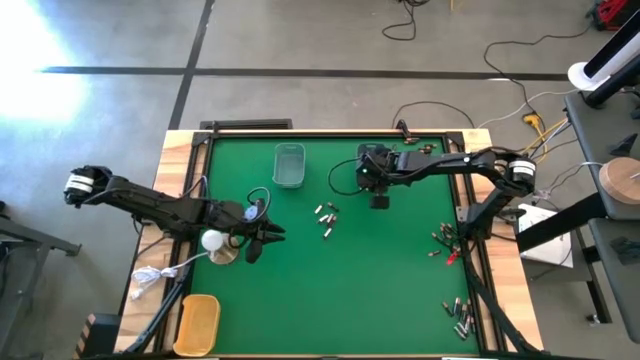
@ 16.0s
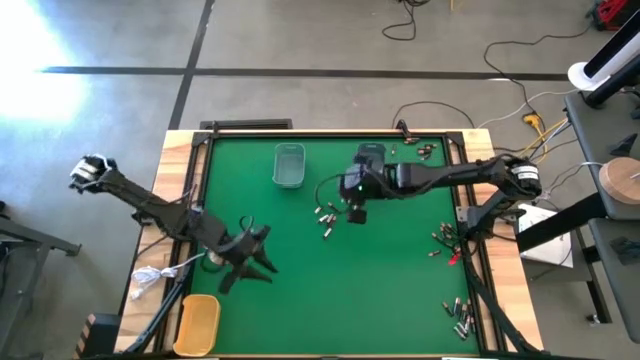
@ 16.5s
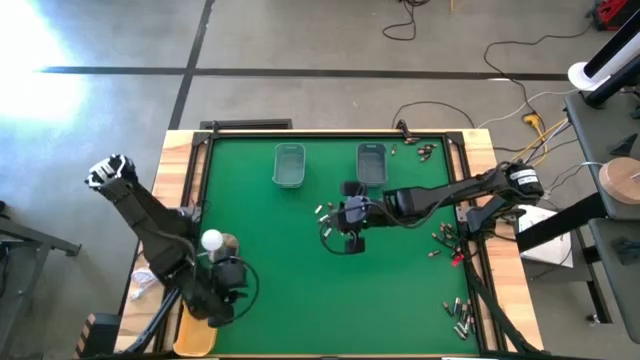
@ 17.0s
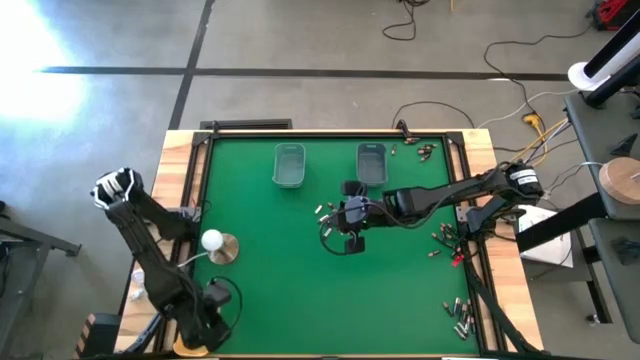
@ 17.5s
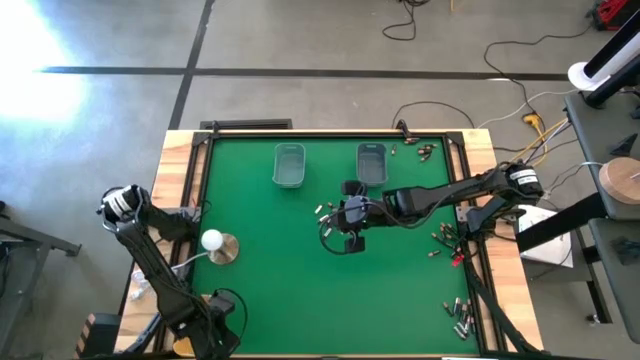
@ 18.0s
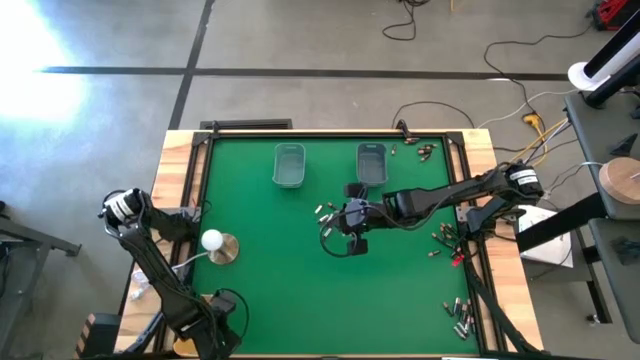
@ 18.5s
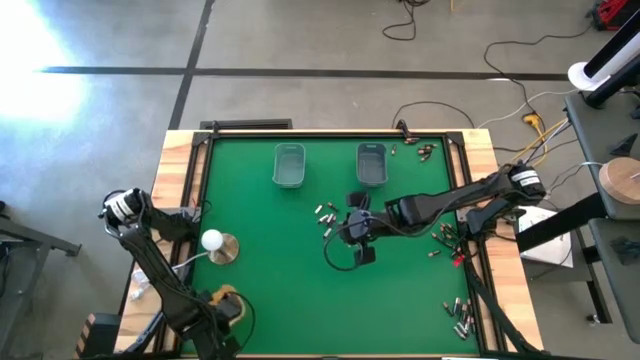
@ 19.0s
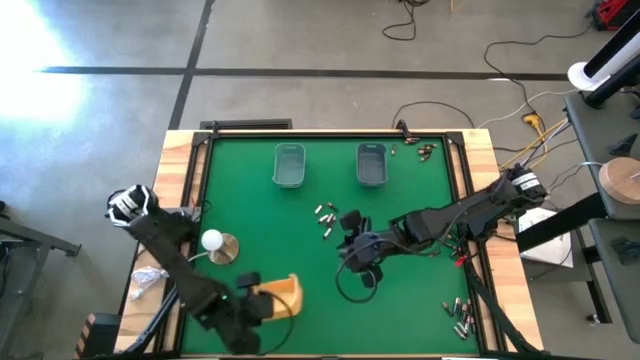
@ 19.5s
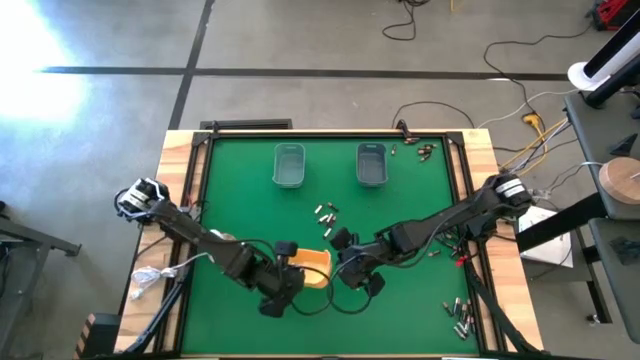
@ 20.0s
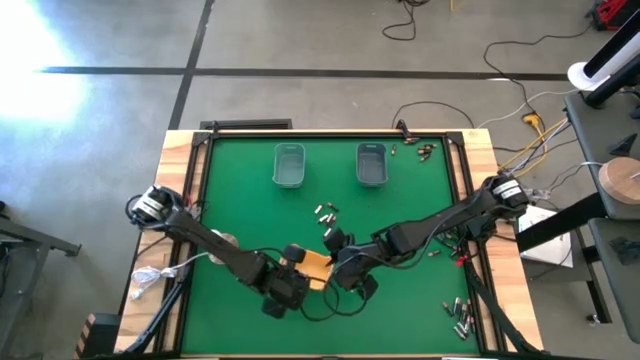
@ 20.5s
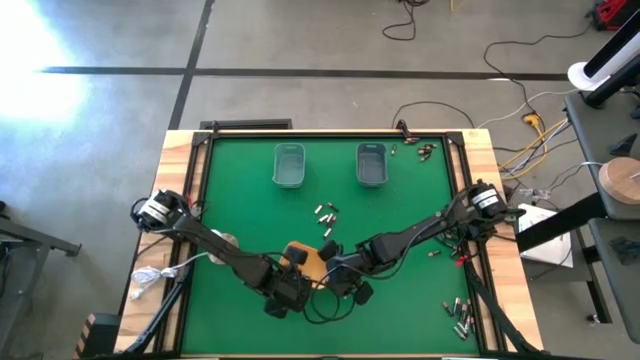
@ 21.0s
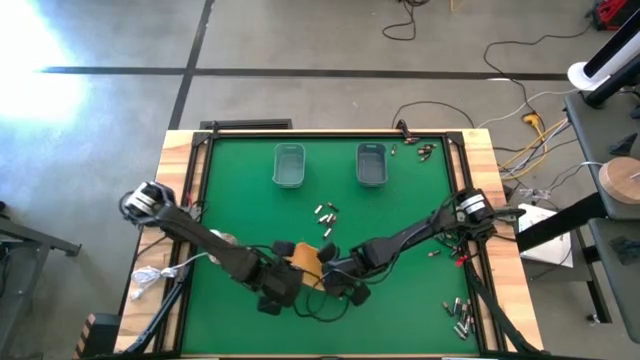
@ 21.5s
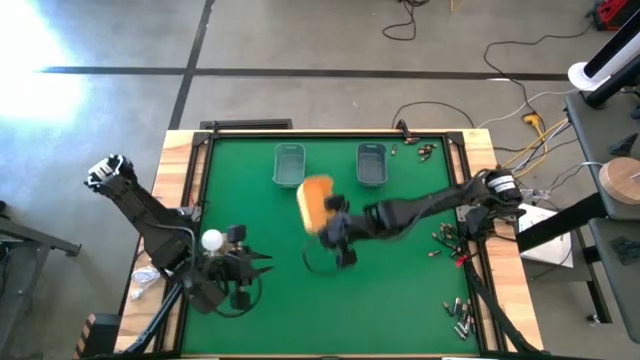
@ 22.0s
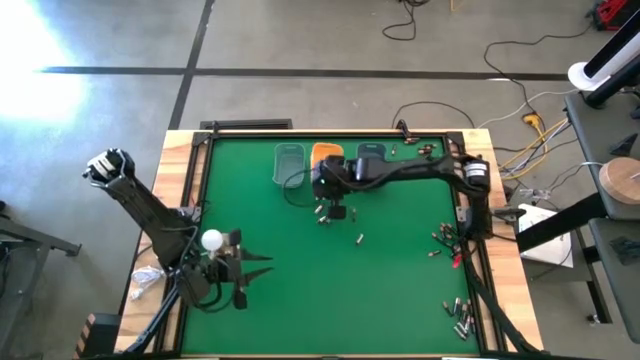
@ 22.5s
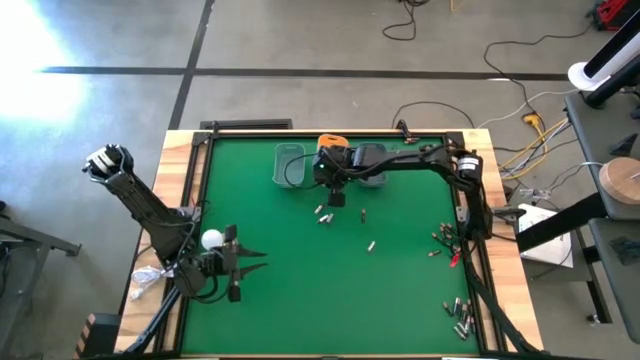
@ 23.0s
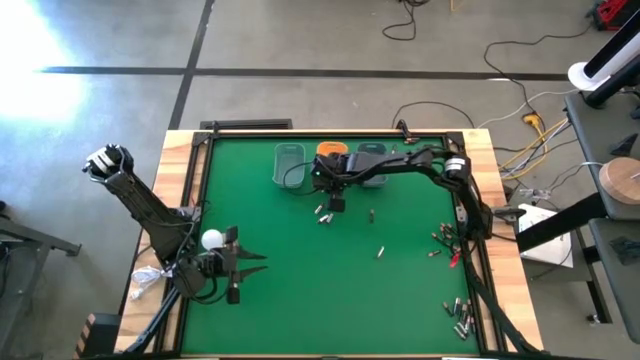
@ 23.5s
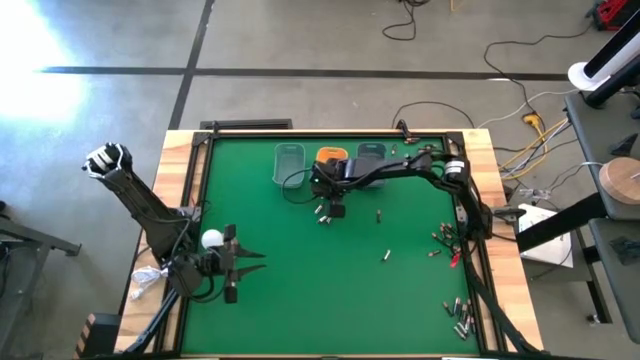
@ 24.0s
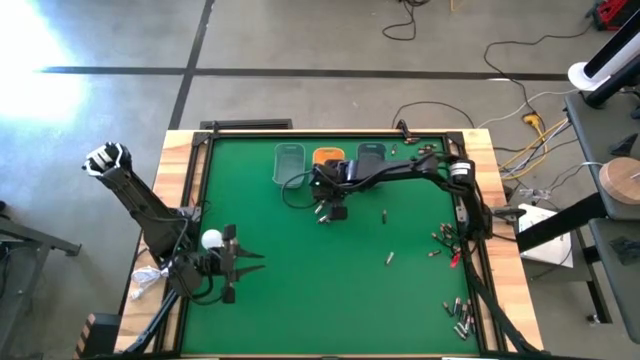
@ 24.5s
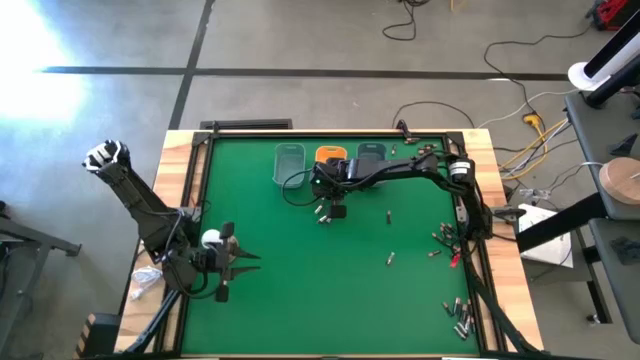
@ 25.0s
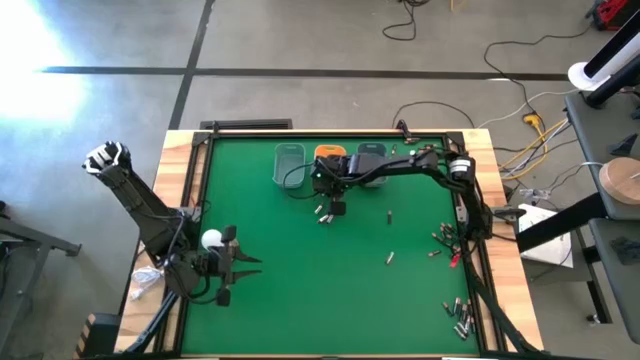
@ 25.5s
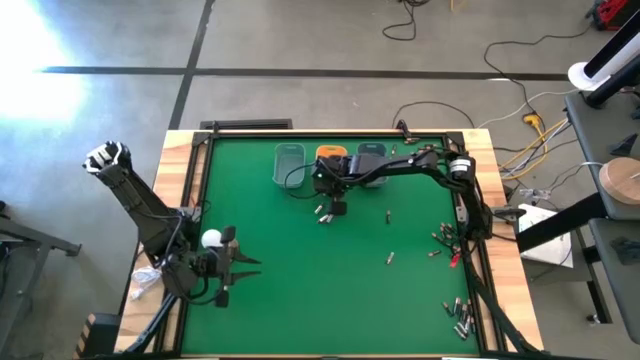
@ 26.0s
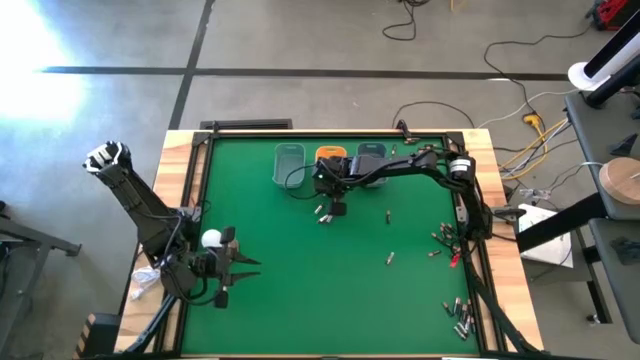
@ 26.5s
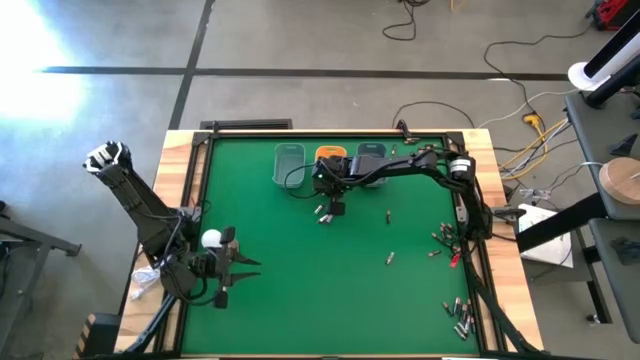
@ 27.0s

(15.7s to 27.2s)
Task: Sort batteries
Move the yellow bin to the top middle of the table

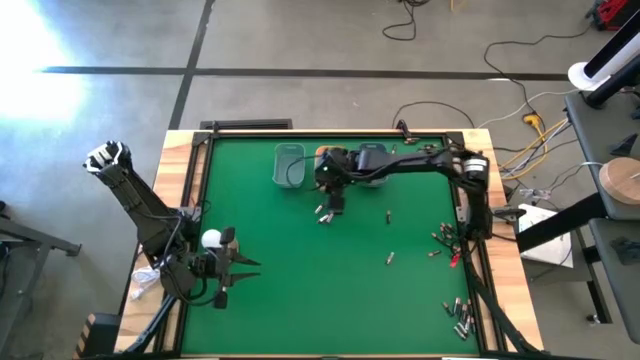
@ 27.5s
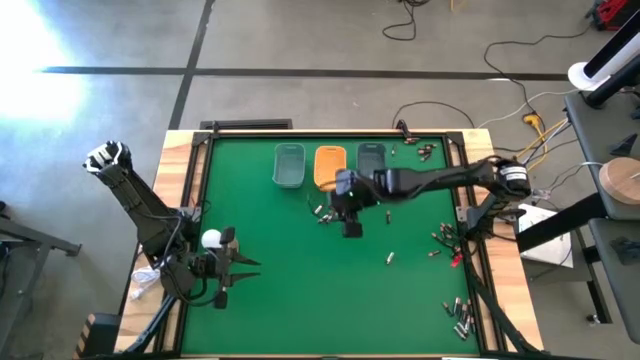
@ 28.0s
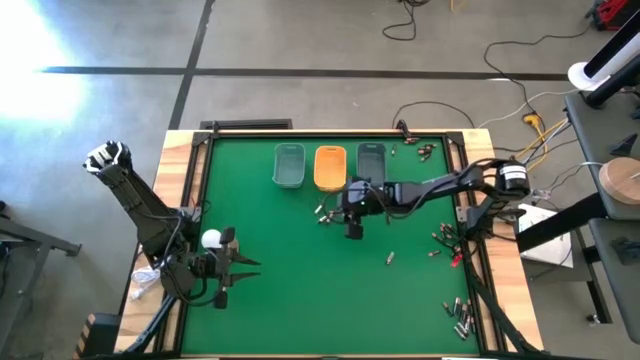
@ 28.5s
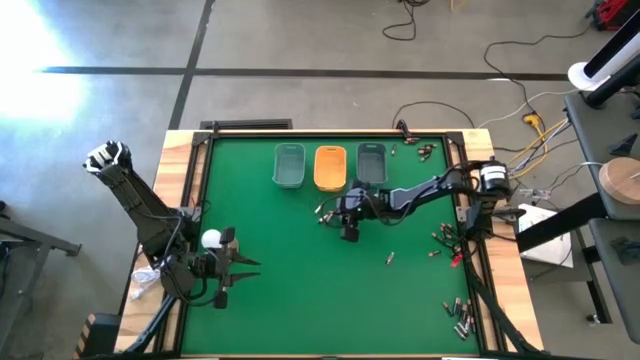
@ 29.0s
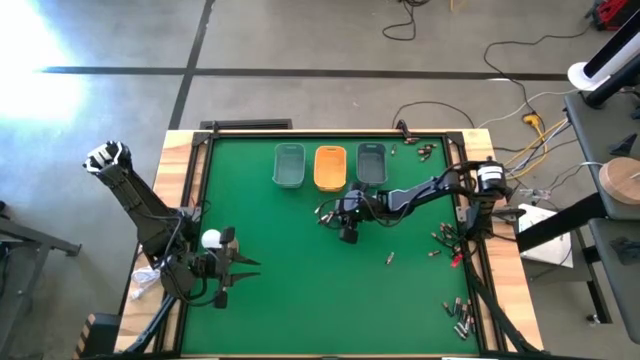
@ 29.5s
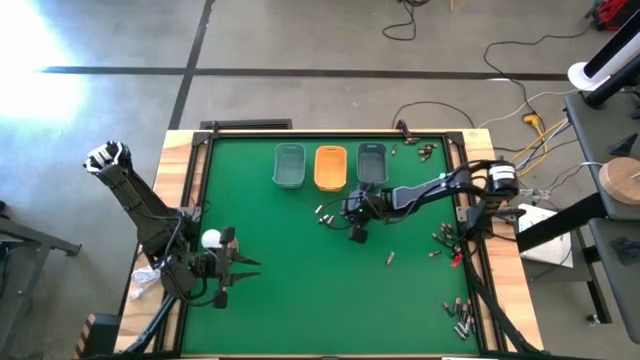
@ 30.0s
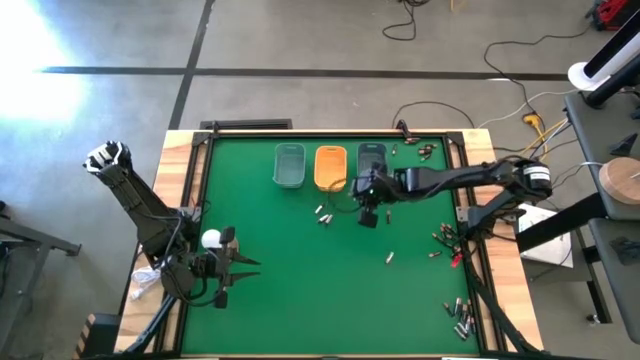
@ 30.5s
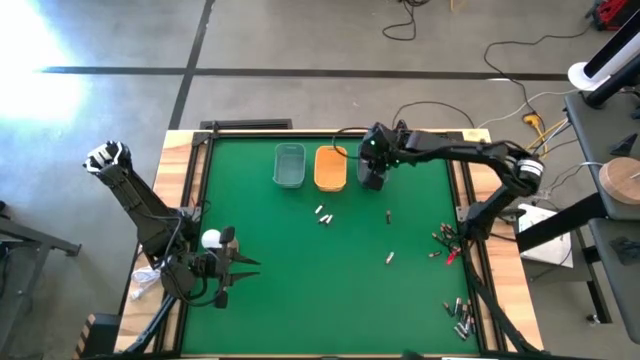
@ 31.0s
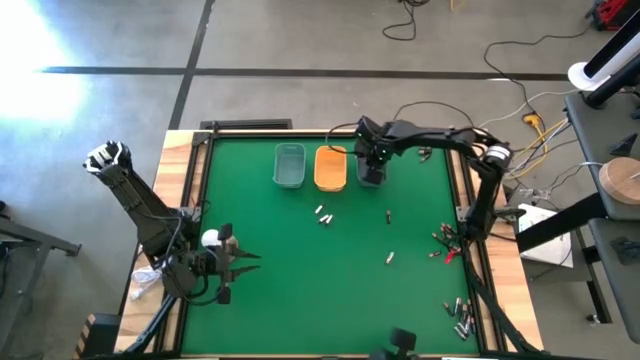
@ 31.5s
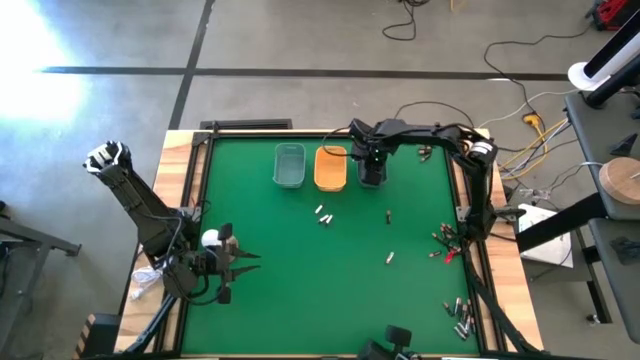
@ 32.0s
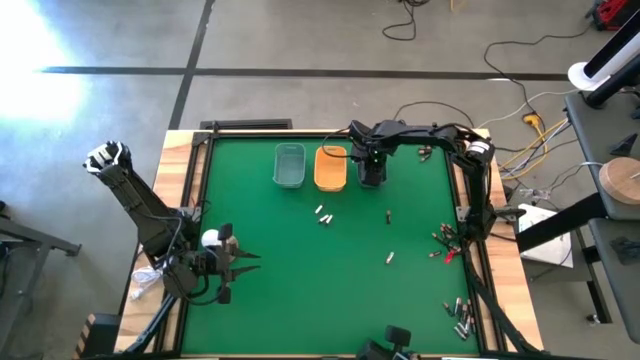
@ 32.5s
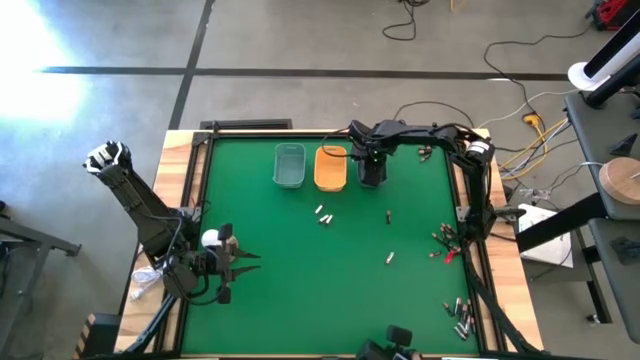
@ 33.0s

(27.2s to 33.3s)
Put the small brown battery into the gray bin

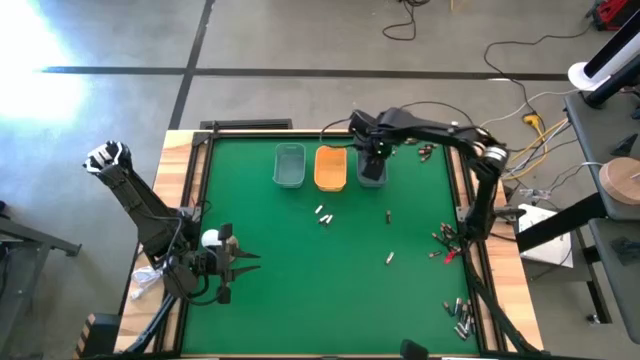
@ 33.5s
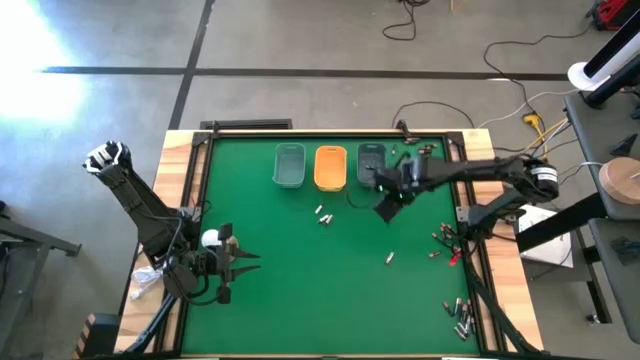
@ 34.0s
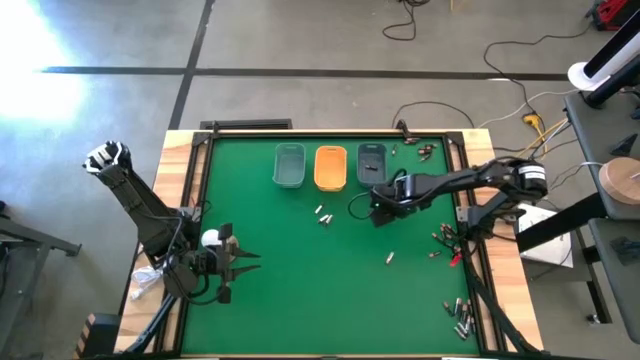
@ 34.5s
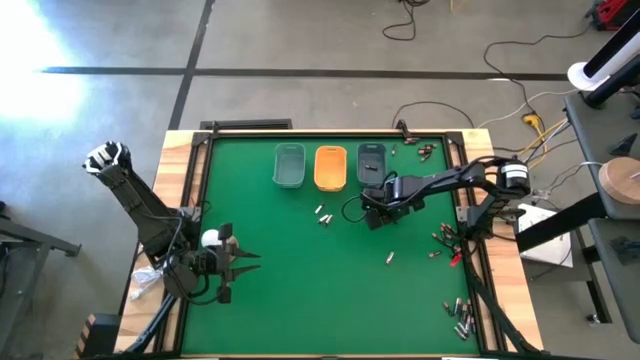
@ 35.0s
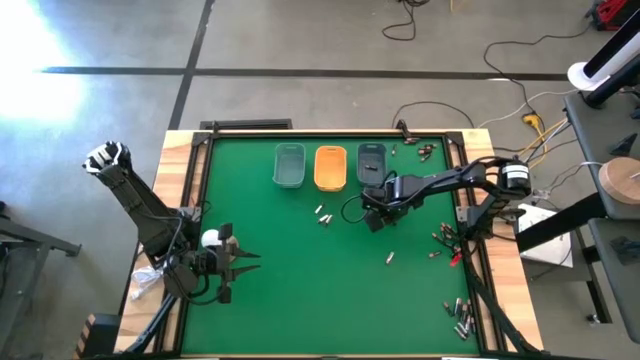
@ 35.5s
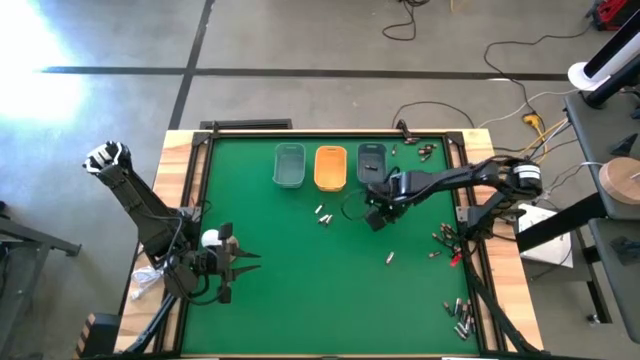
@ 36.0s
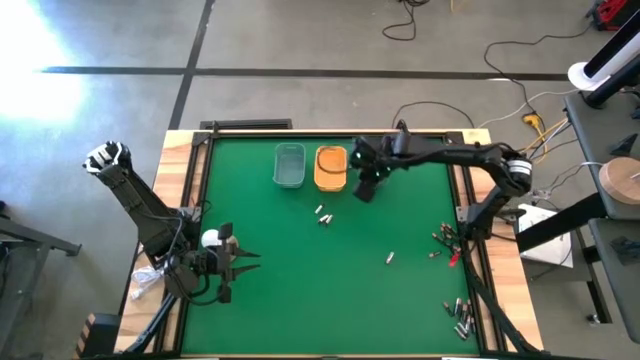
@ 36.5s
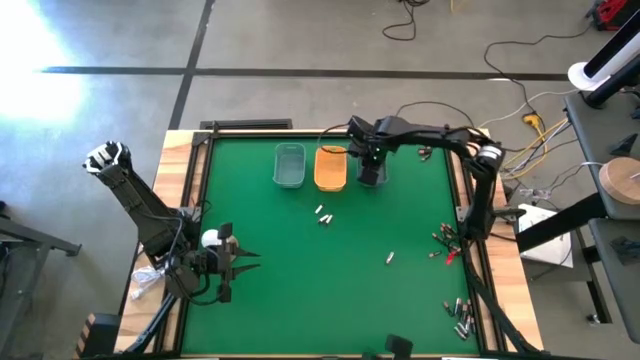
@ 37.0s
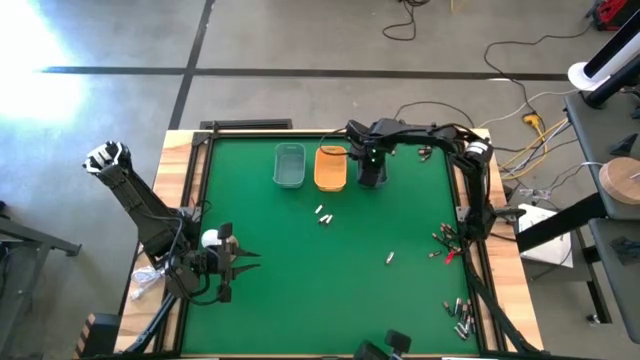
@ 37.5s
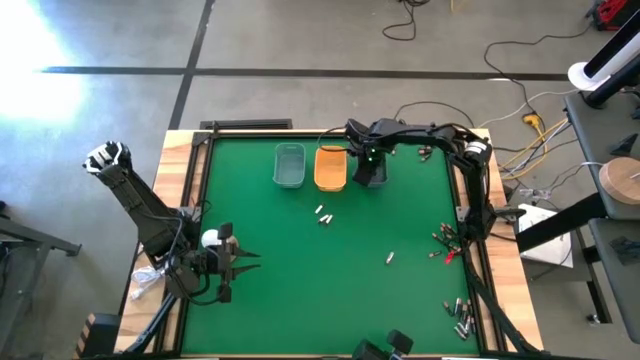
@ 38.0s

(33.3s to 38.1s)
Put the small brown battery into the gray bin
